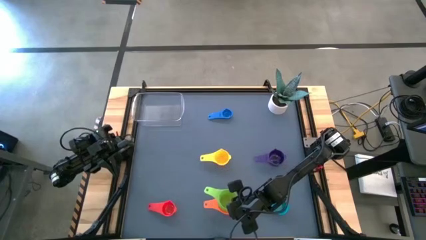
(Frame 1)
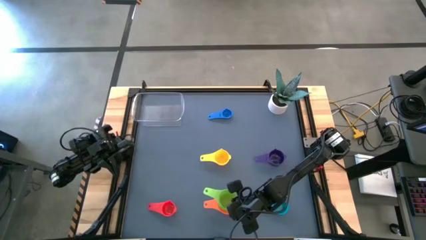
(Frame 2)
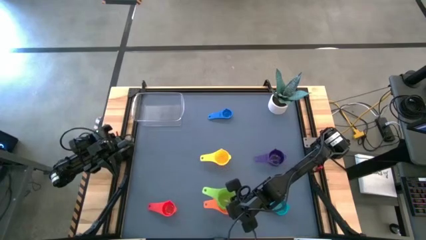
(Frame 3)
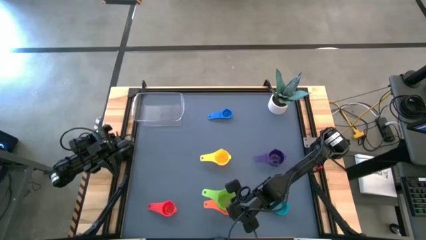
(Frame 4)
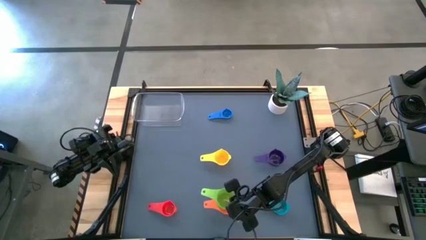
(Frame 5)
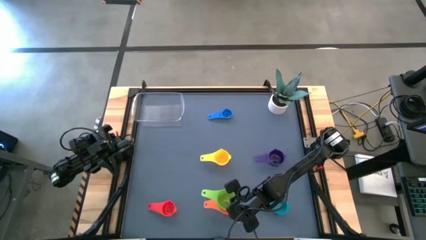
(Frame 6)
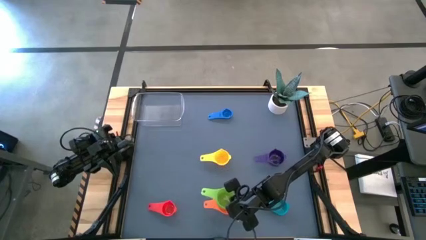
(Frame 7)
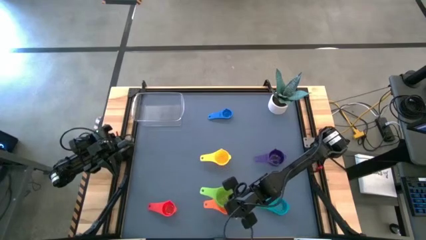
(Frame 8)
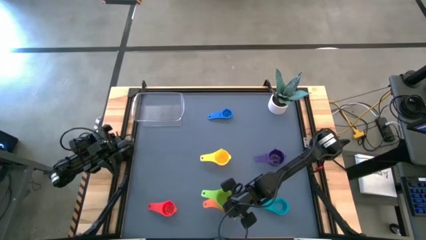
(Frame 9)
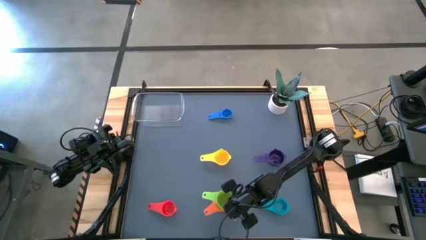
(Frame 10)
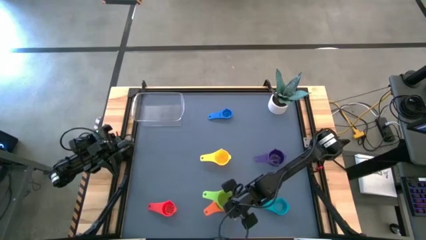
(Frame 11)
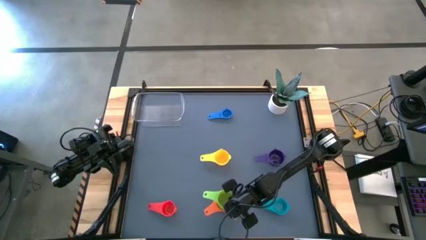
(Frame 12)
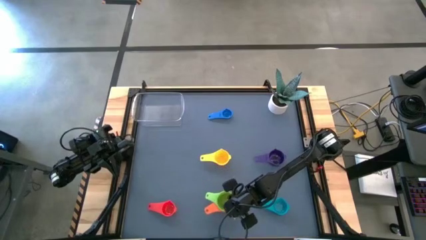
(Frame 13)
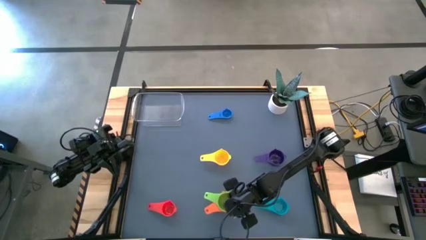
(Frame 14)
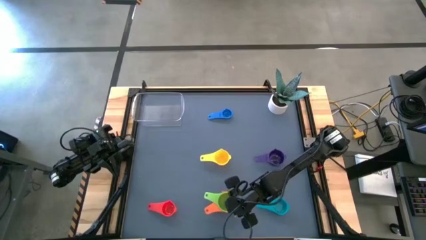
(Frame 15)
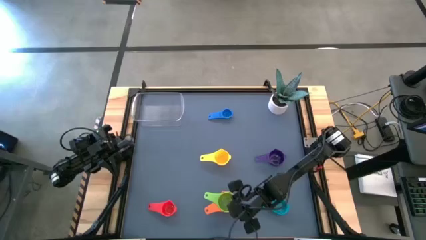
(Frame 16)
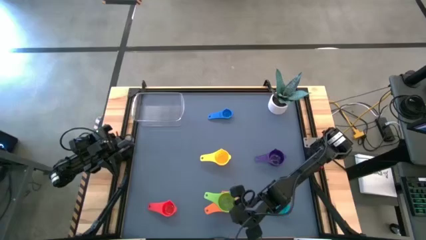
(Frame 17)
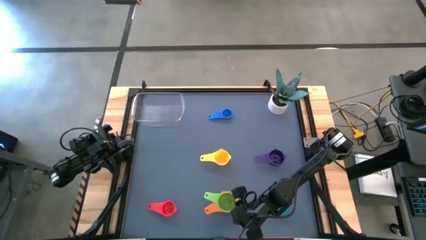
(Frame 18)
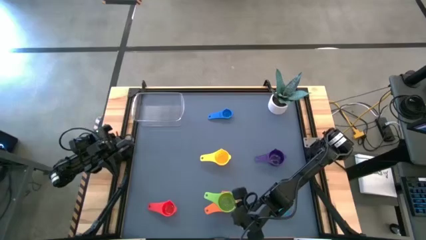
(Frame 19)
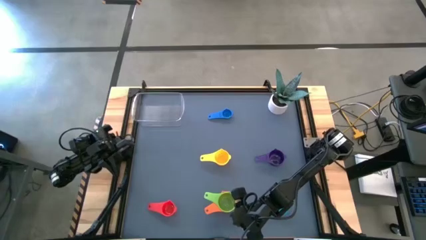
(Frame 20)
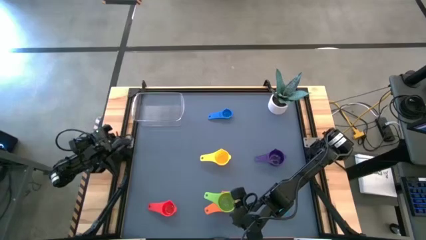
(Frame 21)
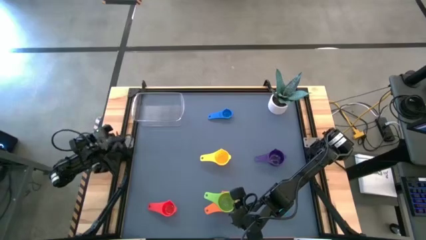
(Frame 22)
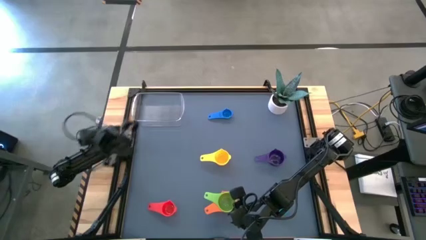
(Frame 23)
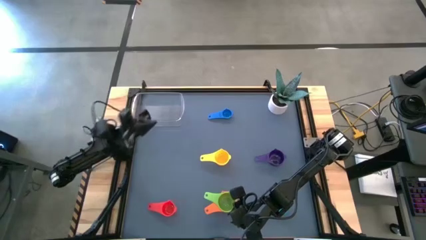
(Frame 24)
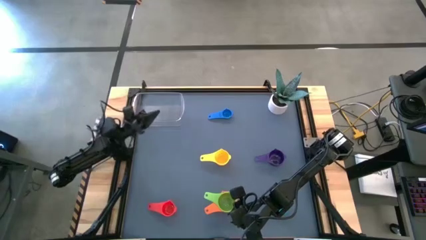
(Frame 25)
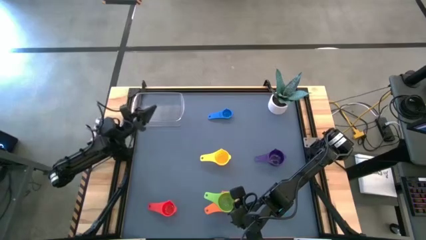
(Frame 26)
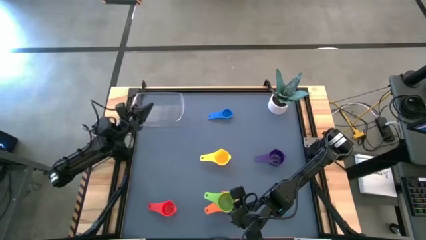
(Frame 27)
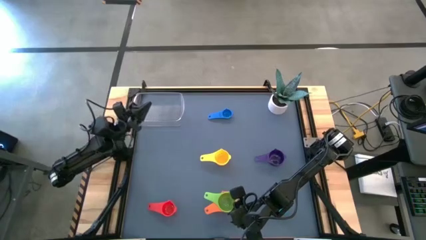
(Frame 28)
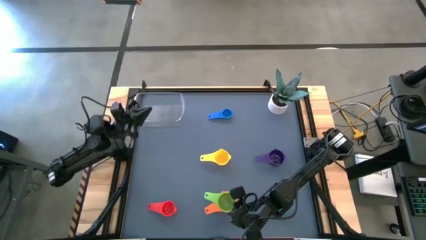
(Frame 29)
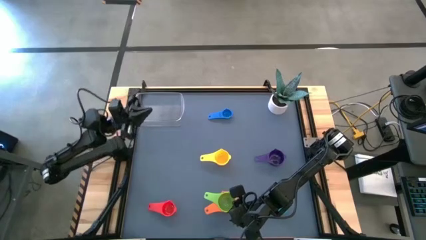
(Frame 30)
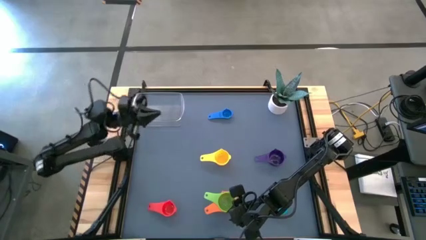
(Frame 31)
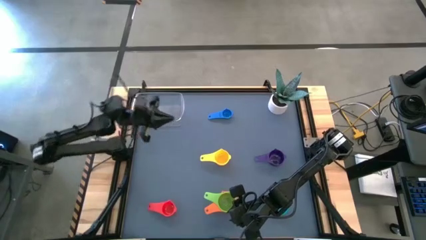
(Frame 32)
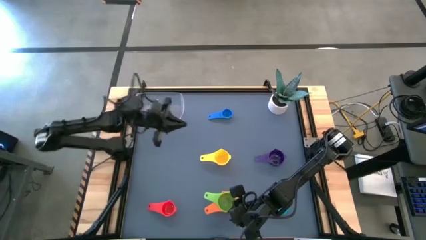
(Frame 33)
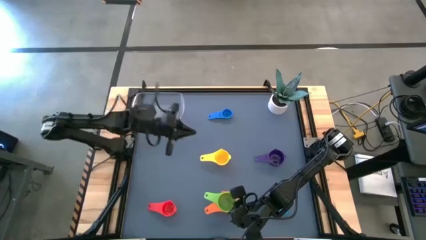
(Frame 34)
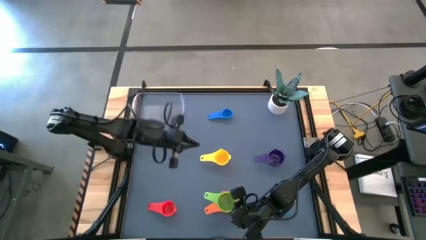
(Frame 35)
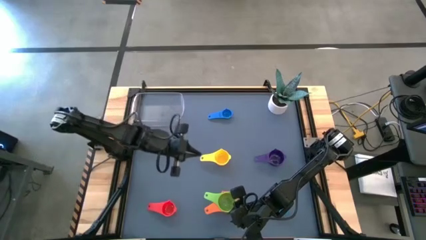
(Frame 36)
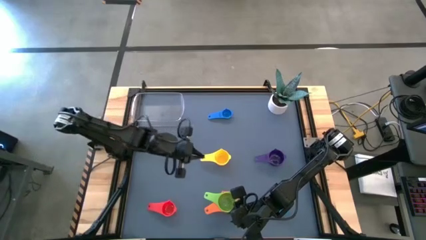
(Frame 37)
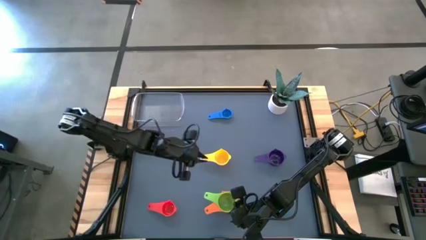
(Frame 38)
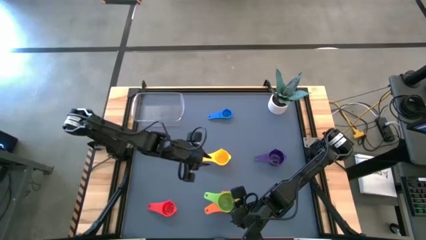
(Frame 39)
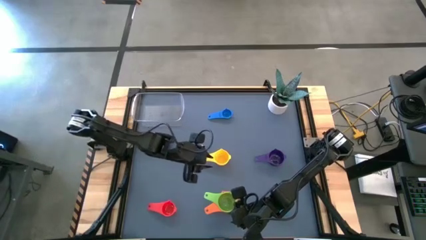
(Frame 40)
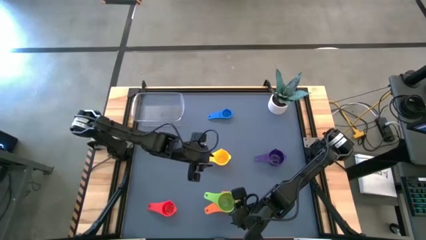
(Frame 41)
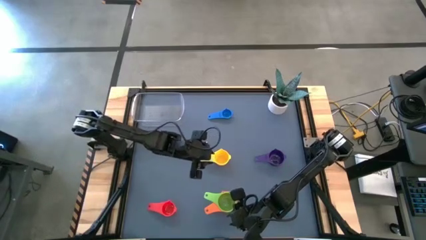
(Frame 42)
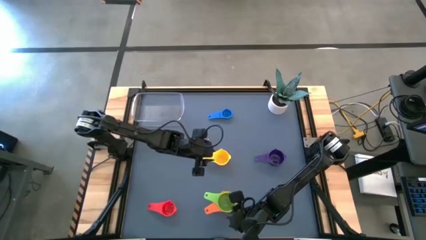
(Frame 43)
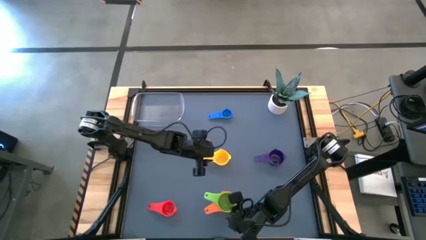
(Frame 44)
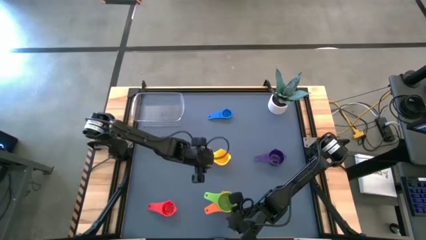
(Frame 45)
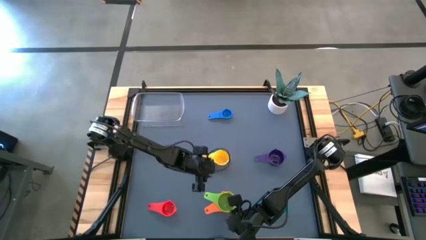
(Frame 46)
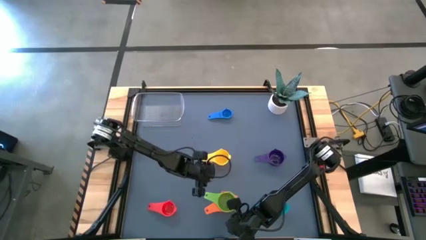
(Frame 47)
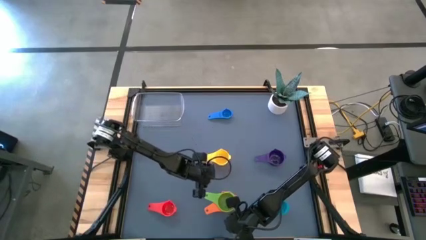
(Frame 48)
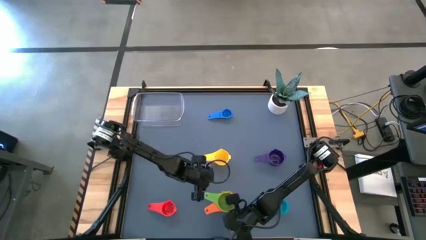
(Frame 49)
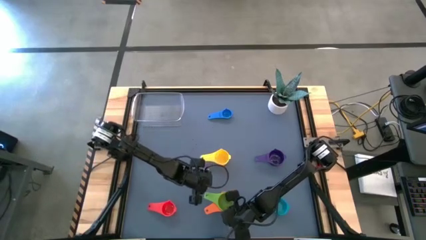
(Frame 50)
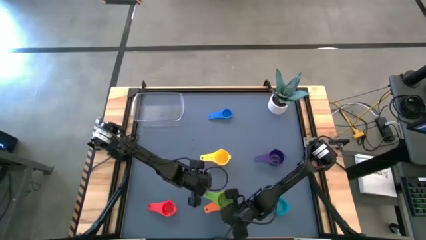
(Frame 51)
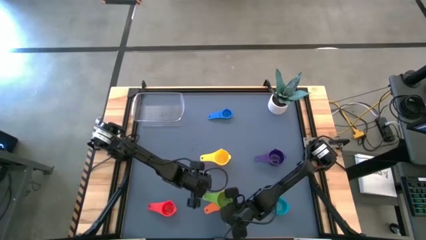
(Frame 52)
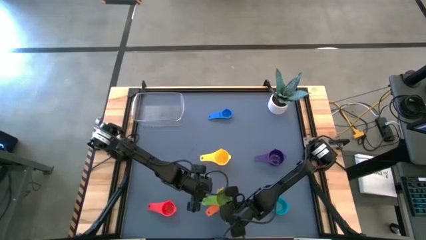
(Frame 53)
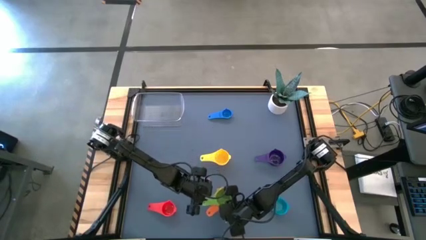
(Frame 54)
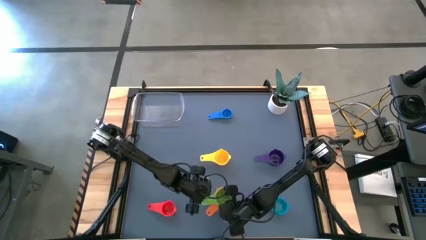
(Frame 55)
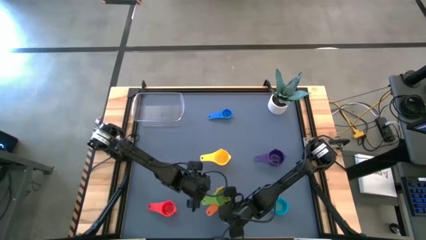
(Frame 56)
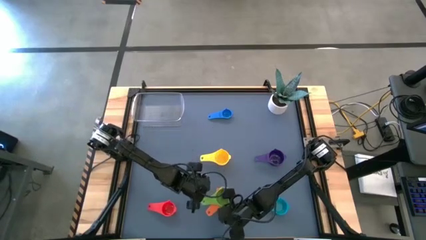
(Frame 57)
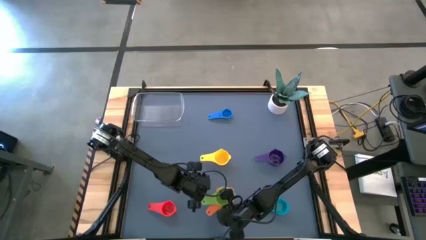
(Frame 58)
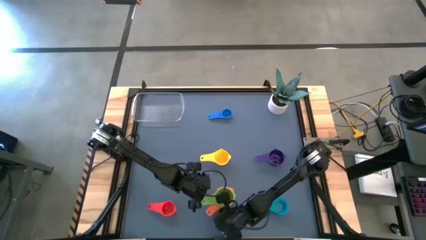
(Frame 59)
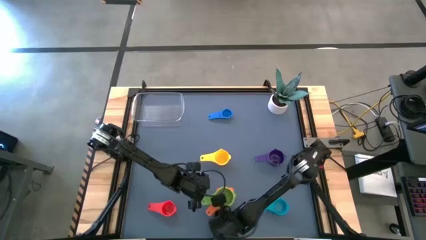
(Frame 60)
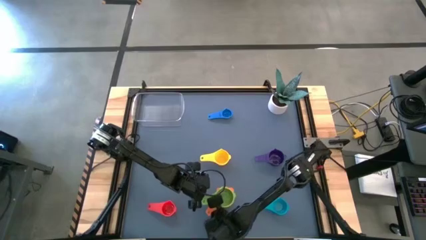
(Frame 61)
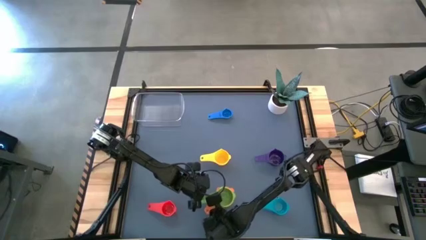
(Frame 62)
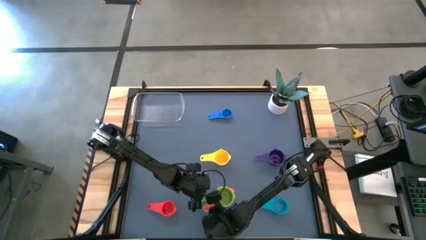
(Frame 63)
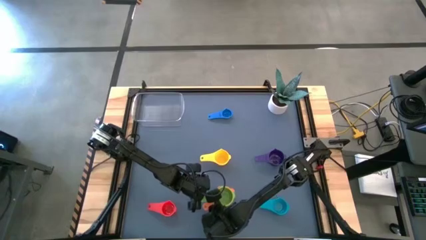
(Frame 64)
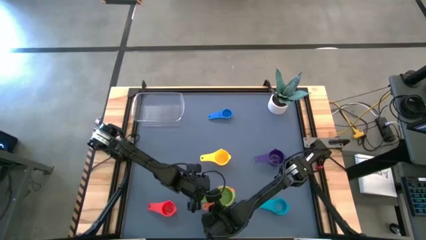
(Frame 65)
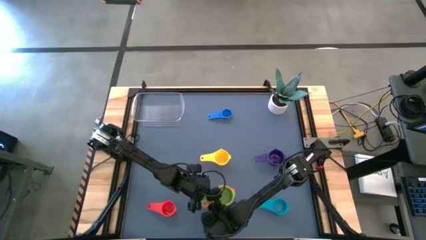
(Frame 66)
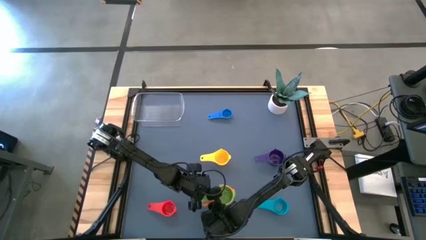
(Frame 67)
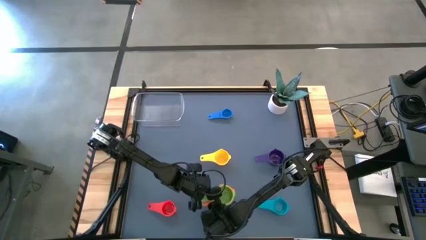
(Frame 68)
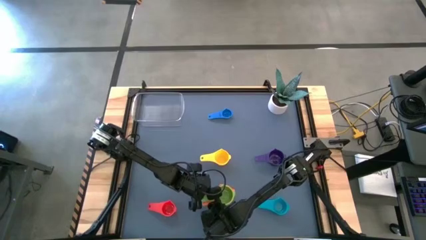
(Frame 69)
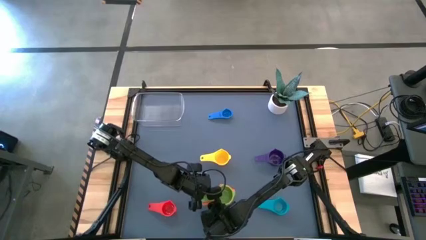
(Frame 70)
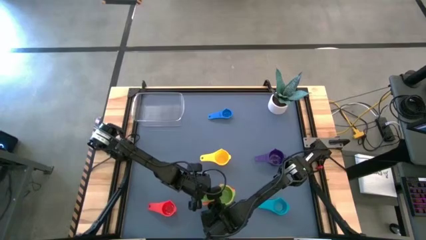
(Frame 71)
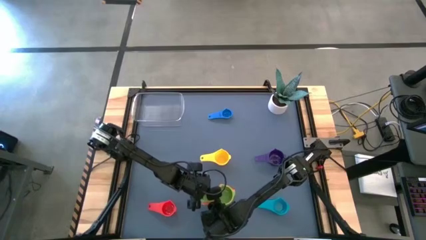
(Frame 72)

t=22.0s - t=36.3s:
Task: Nest measuring cups in basket
Stack the green measuring cup on top of the orange measuring cup
